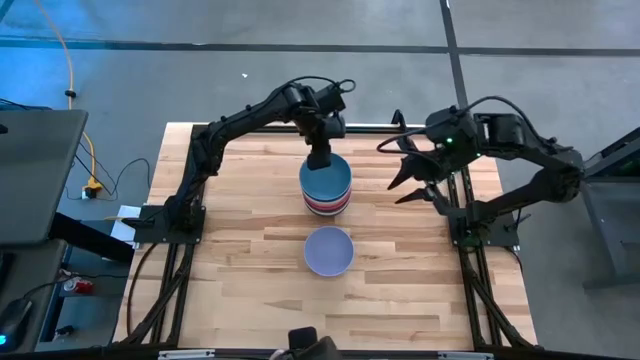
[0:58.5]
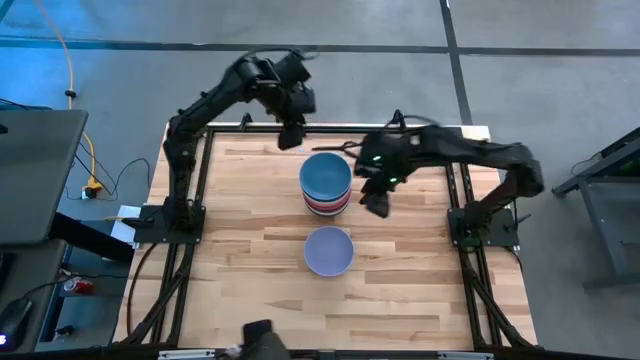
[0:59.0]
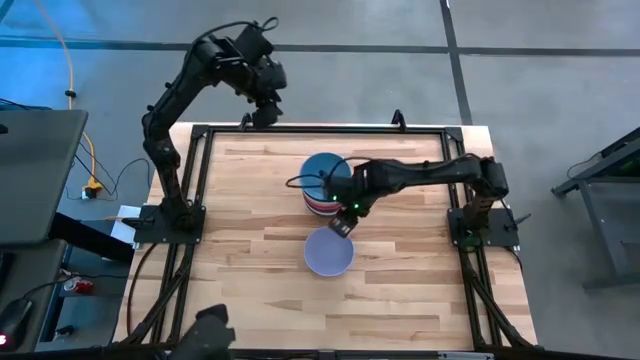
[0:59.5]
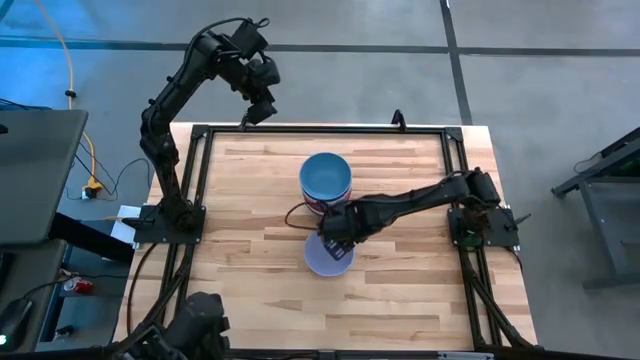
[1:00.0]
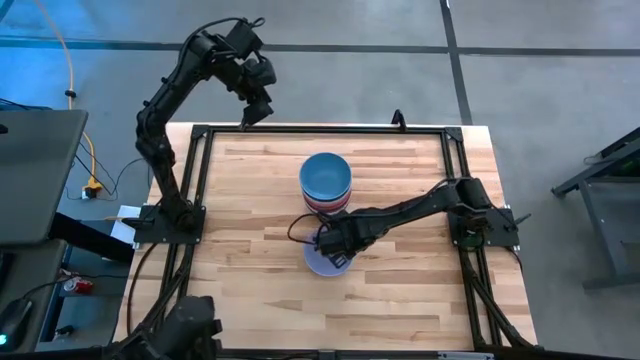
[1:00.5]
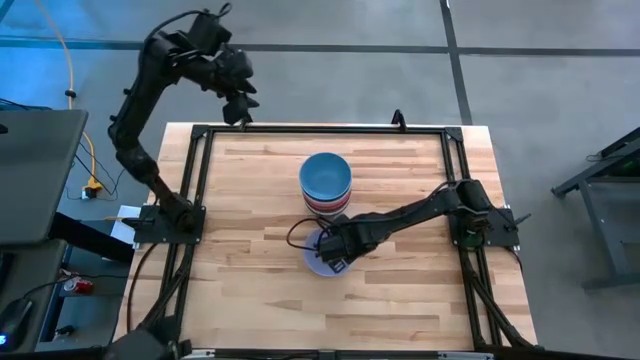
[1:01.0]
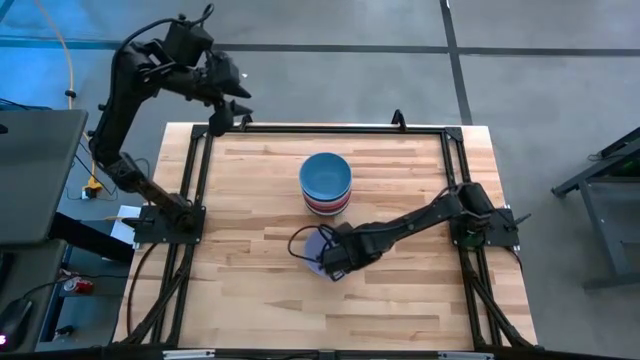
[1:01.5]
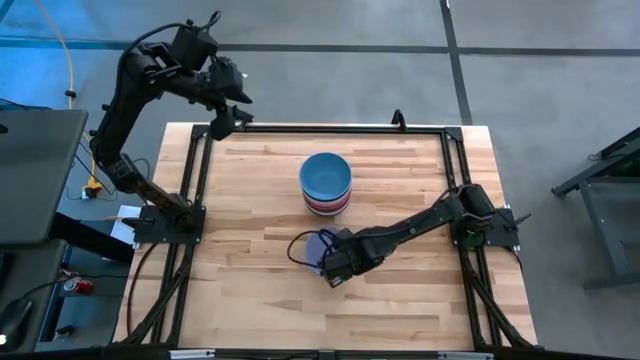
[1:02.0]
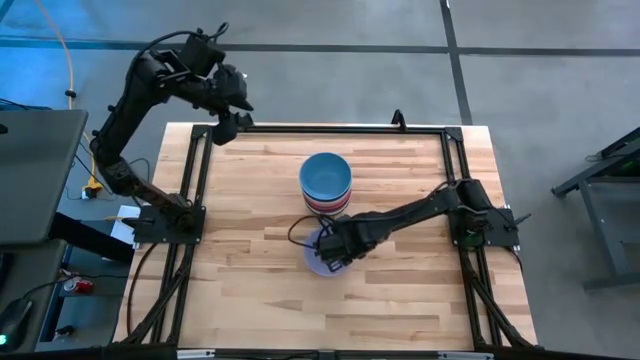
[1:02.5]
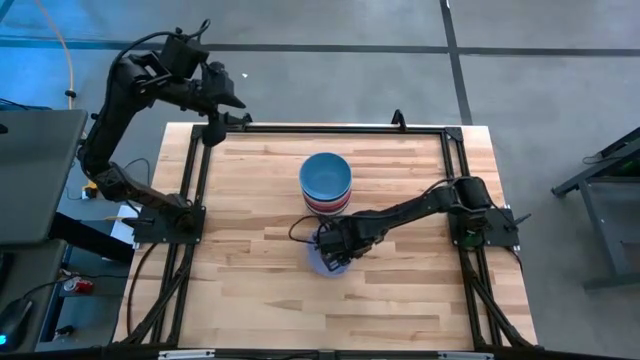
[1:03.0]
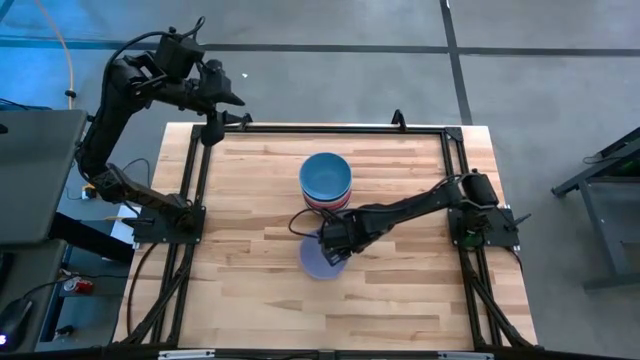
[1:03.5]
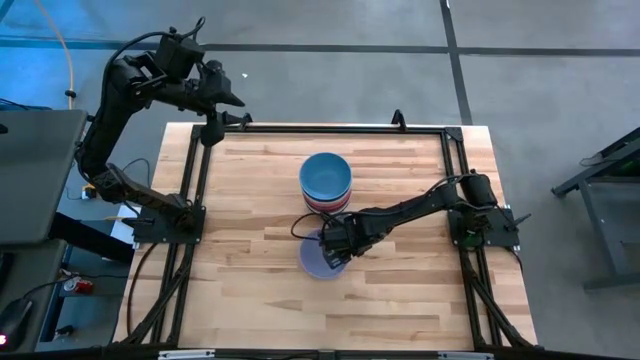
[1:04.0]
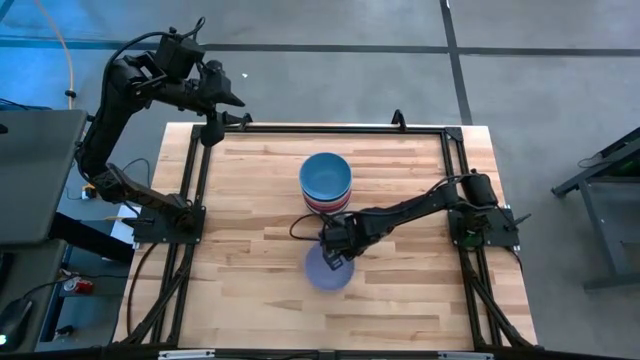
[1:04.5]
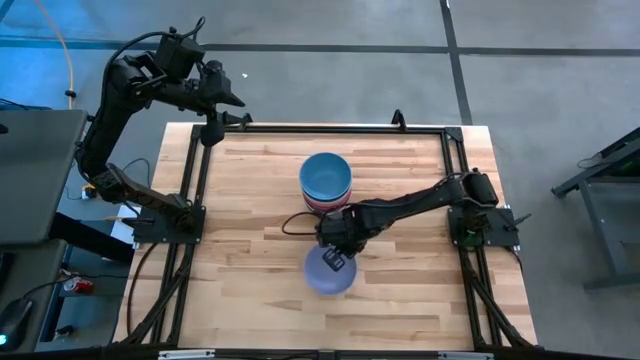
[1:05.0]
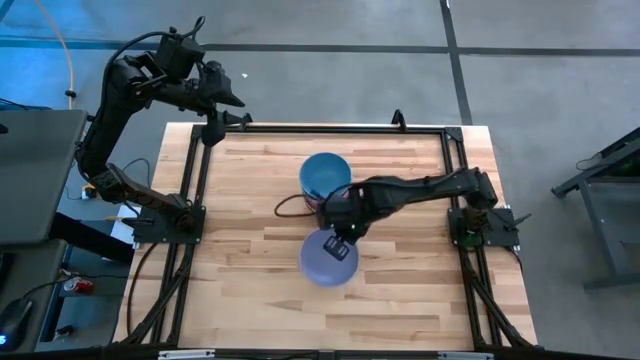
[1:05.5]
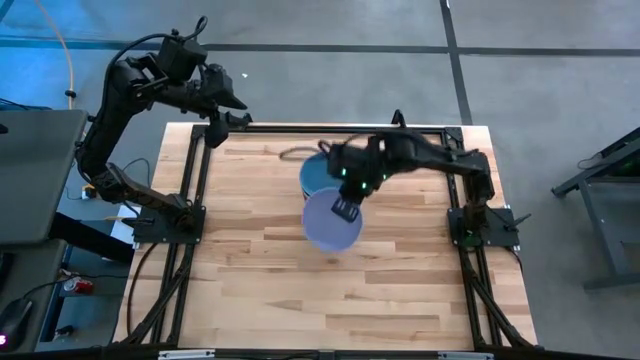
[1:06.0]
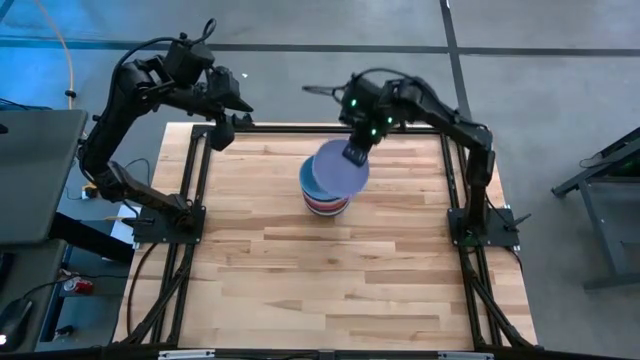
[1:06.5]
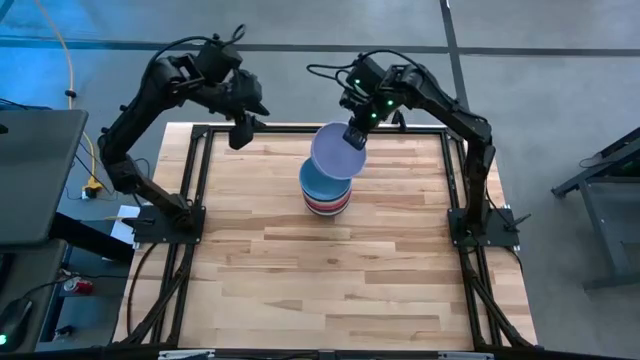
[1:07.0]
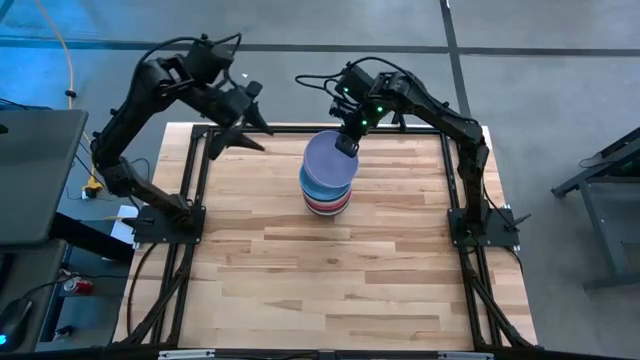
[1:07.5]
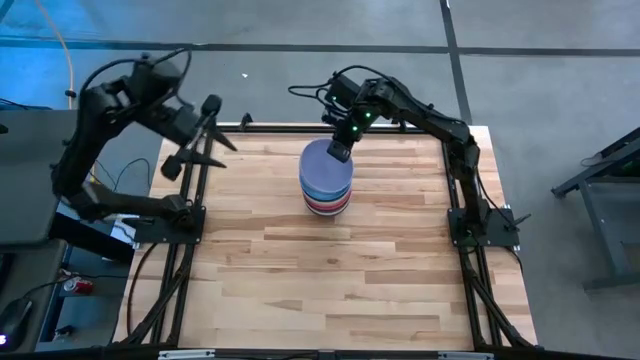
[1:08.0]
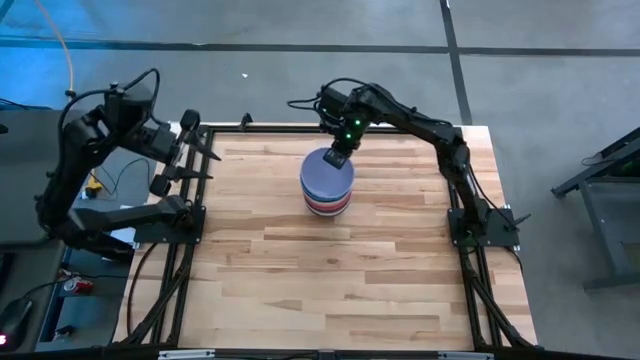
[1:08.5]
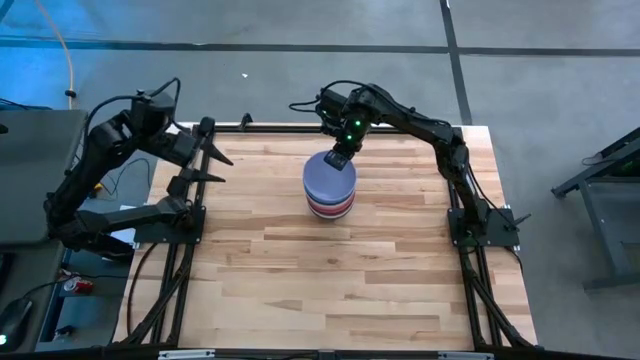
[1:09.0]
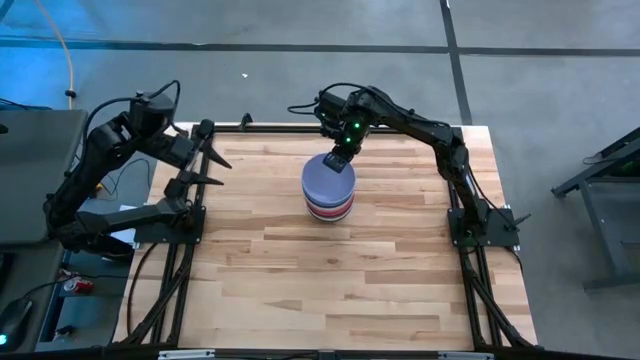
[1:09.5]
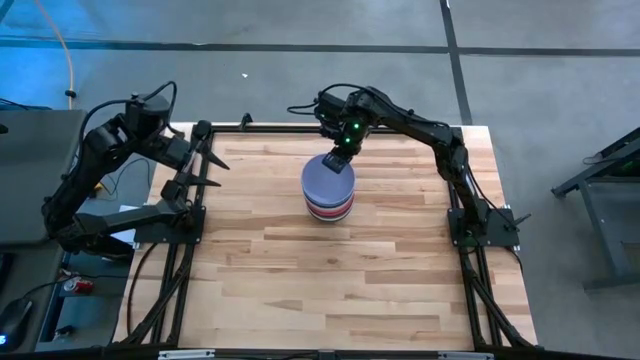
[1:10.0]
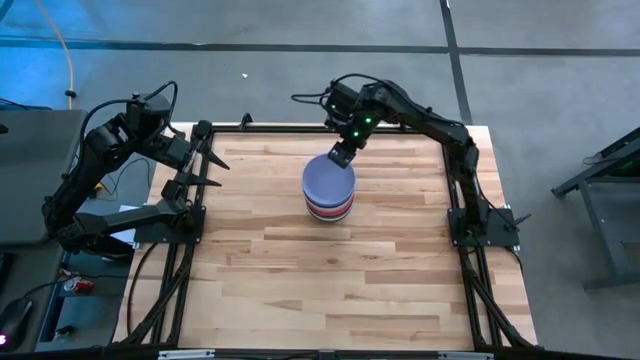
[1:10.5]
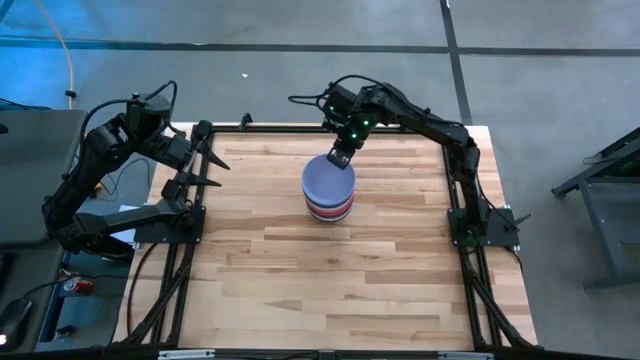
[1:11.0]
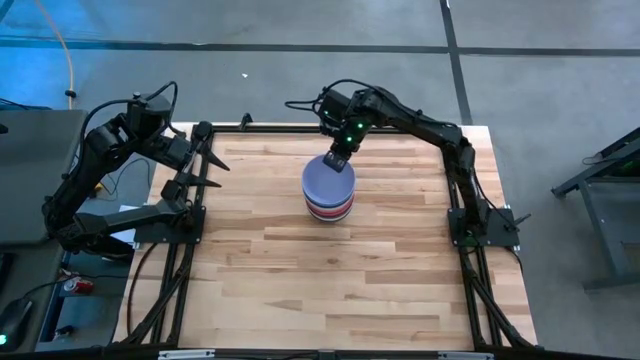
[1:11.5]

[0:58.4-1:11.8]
Task: Nest bowls inside each other
Stack the purple bowl on top of the blue bowl

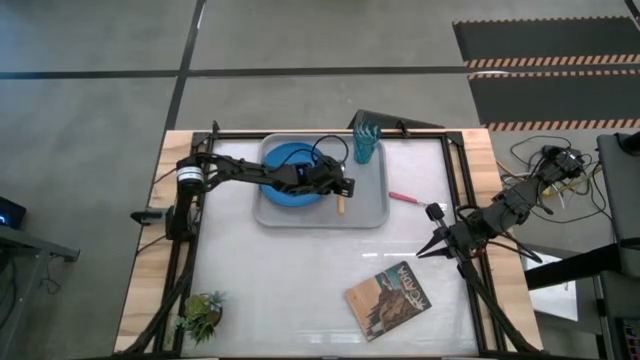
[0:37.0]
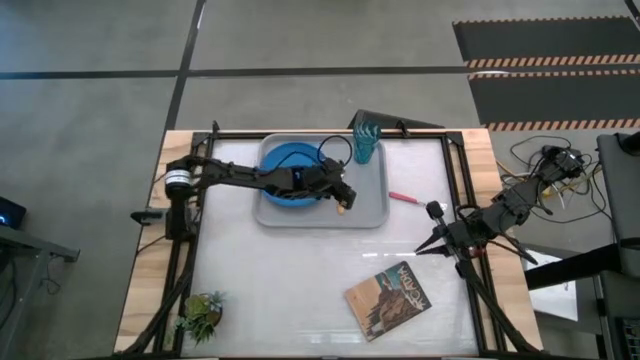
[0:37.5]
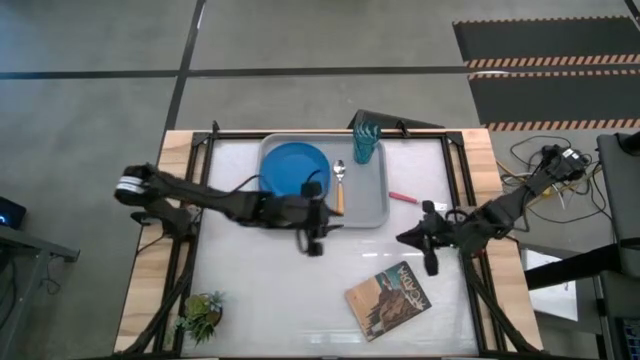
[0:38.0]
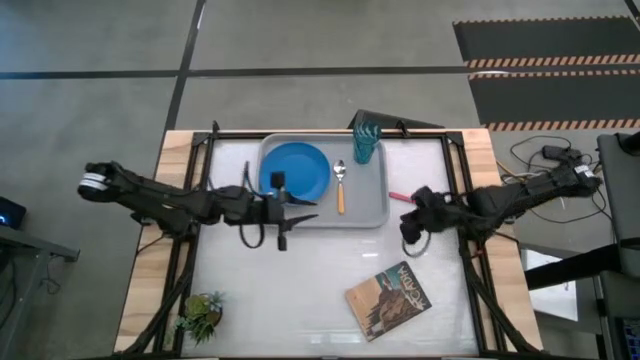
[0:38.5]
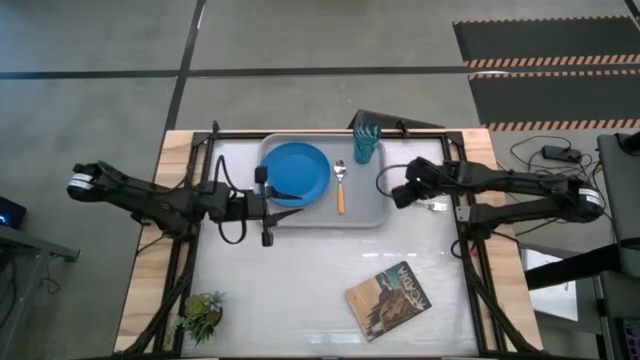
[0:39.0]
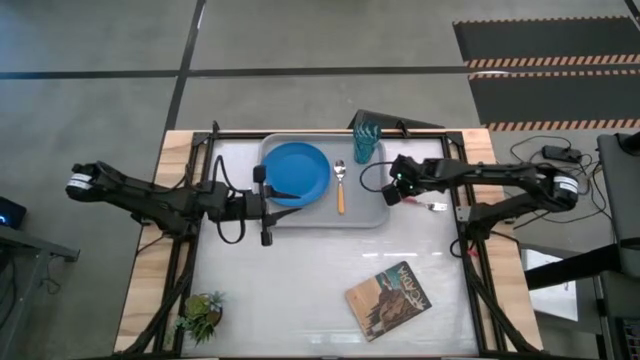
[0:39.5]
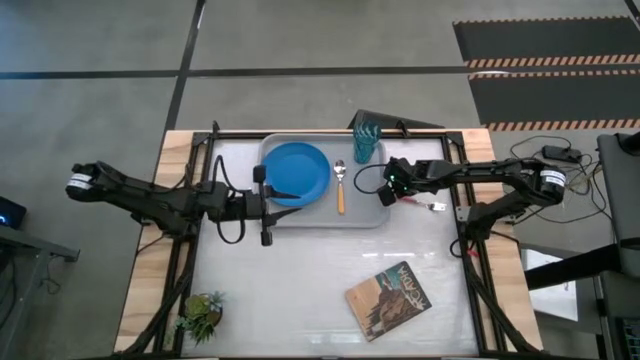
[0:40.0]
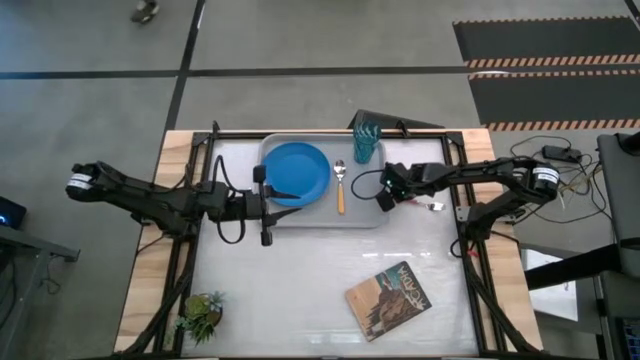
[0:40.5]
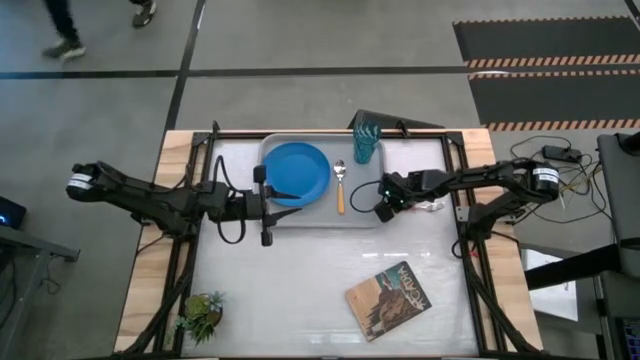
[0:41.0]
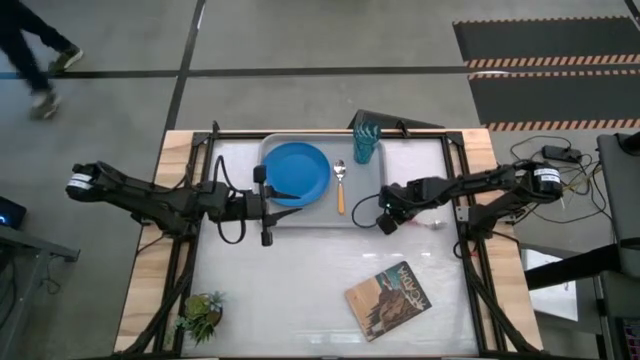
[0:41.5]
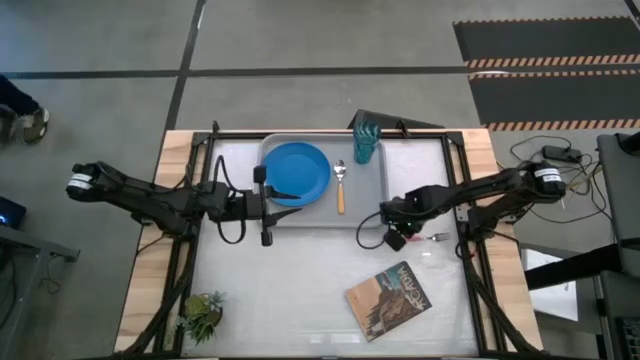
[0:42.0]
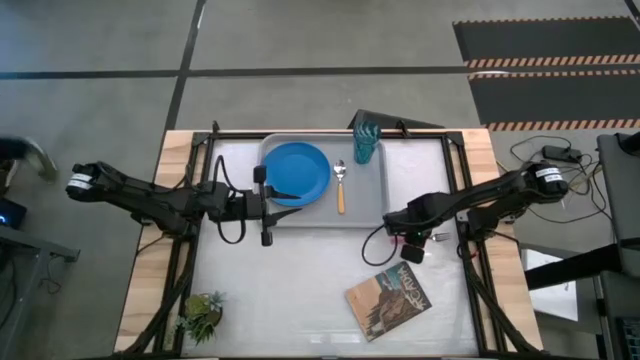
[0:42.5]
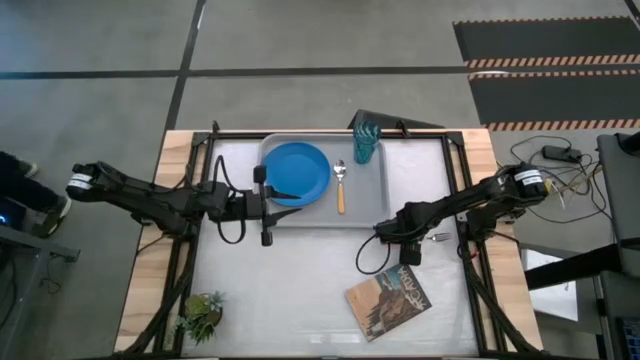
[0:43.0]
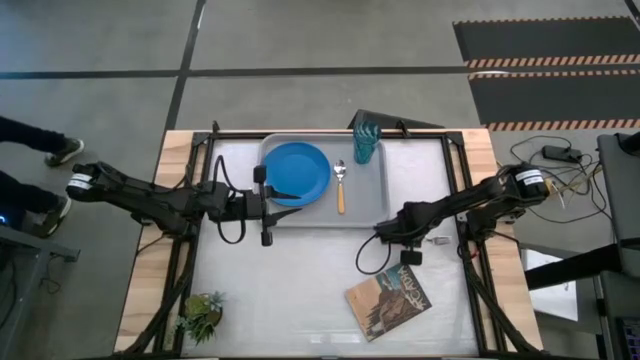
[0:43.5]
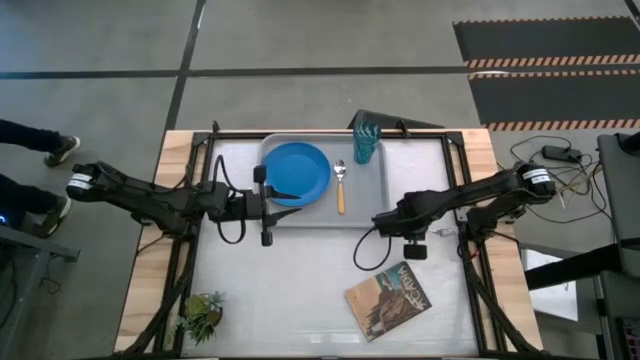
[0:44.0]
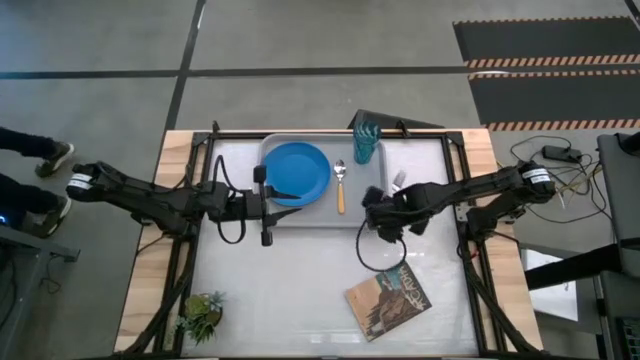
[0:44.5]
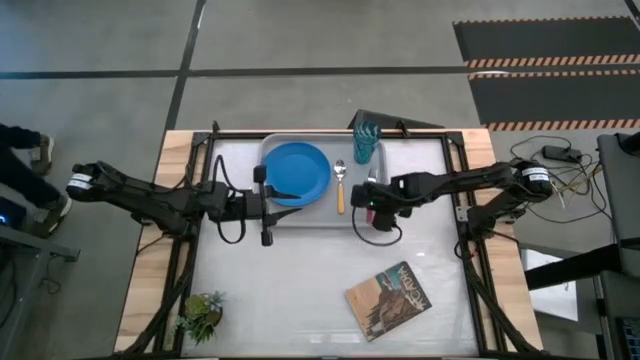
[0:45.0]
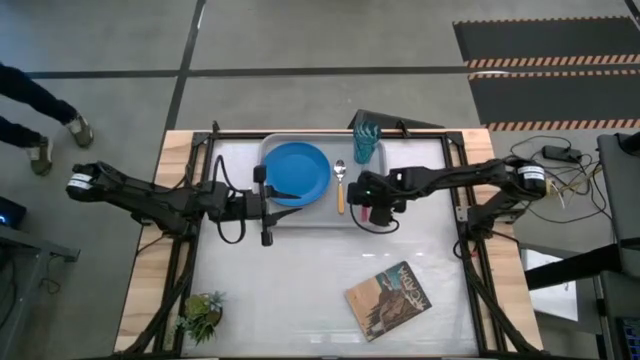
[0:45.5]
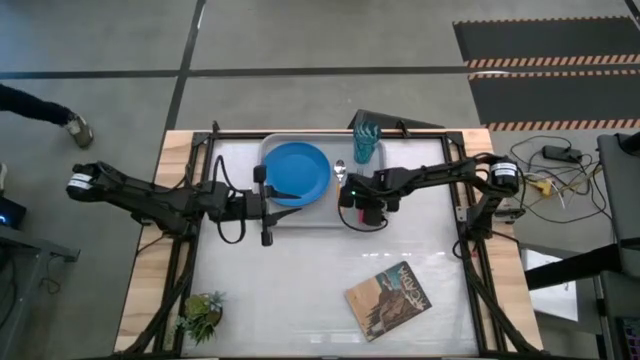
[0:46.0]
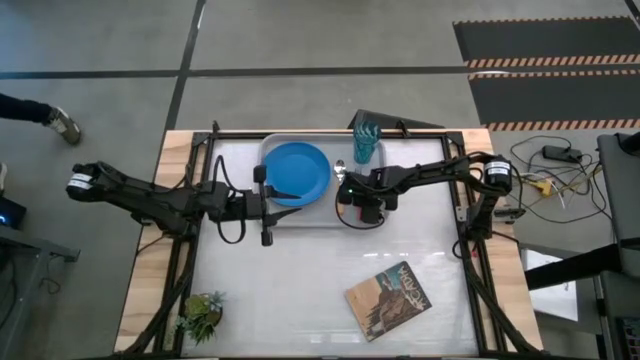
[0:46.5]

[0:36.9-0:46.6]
Task: Pick and place plate/cup/fork/spoon on tray
Put the red fork on the gray tray to the right of the yellow spoon
